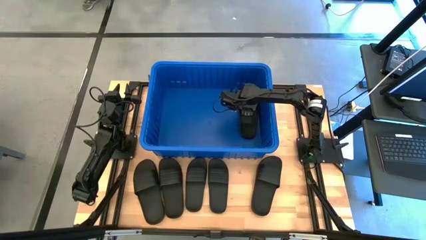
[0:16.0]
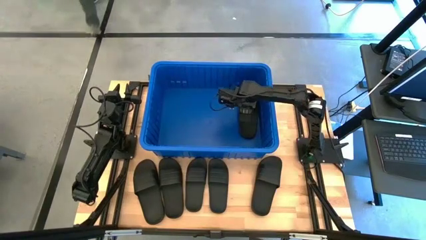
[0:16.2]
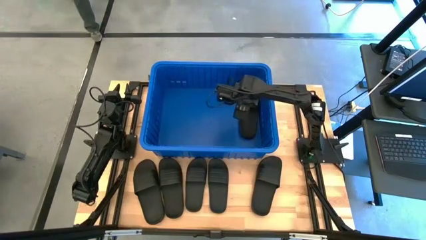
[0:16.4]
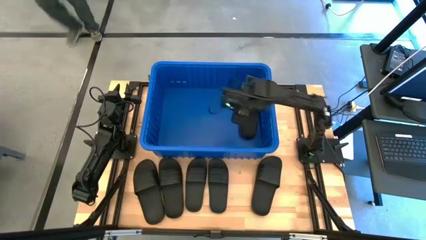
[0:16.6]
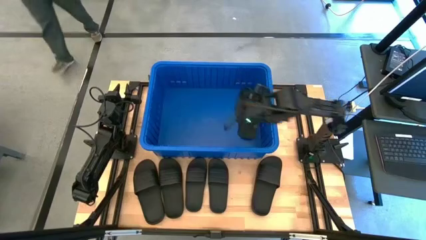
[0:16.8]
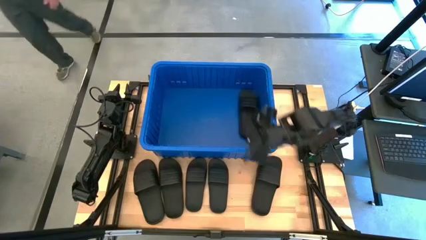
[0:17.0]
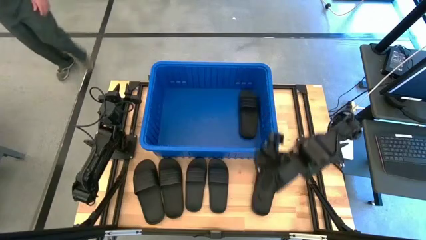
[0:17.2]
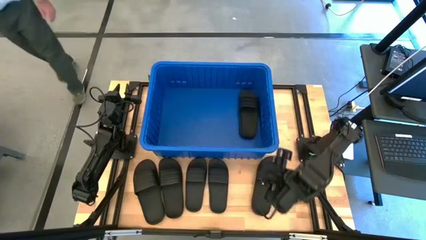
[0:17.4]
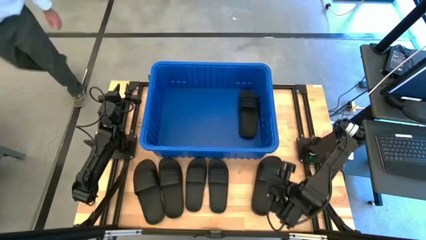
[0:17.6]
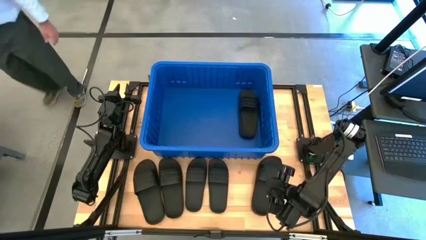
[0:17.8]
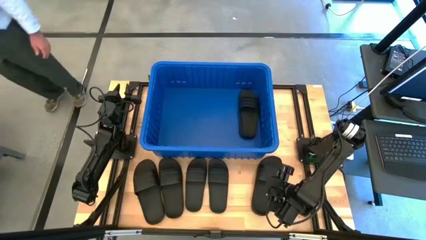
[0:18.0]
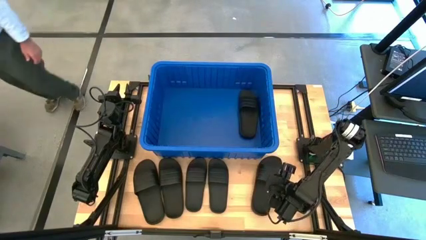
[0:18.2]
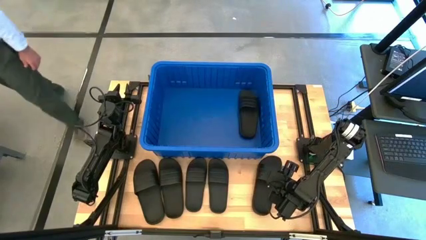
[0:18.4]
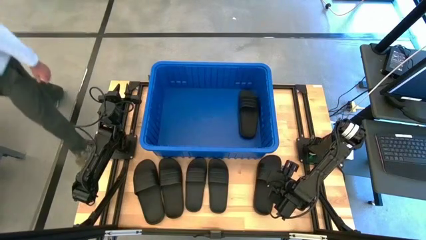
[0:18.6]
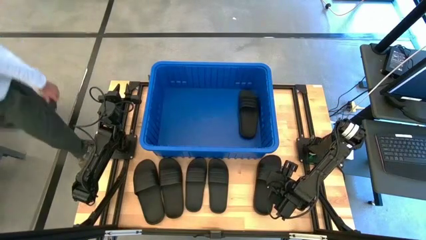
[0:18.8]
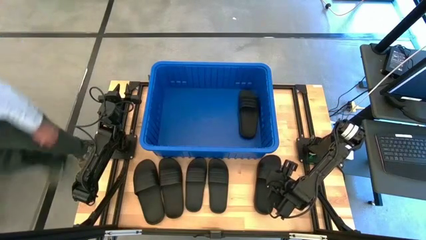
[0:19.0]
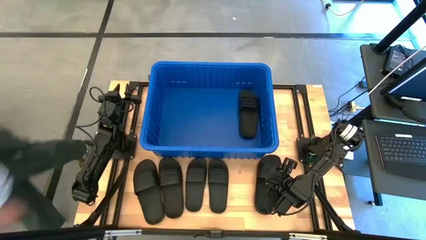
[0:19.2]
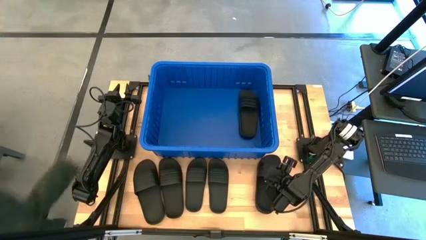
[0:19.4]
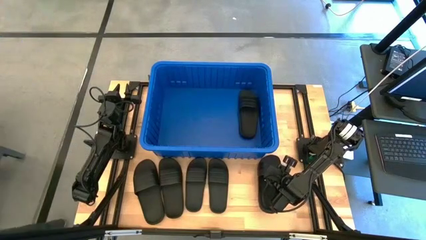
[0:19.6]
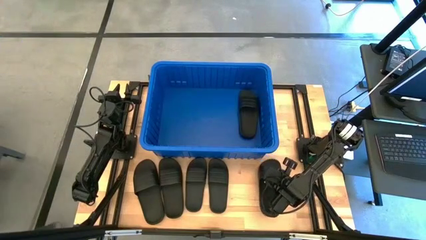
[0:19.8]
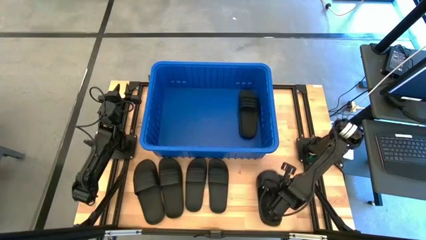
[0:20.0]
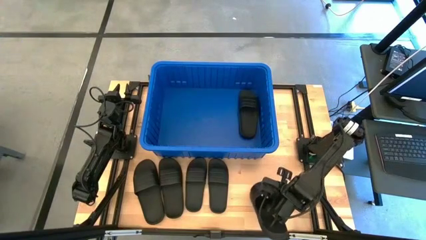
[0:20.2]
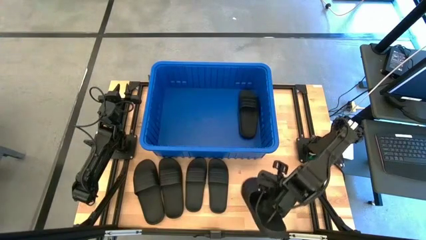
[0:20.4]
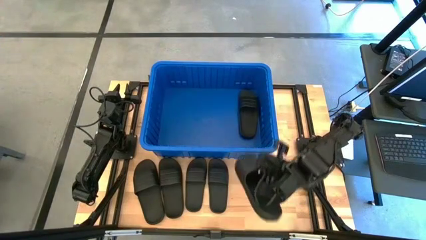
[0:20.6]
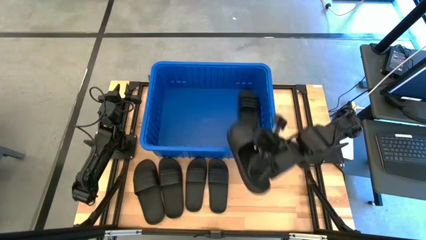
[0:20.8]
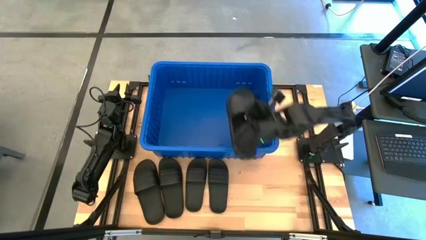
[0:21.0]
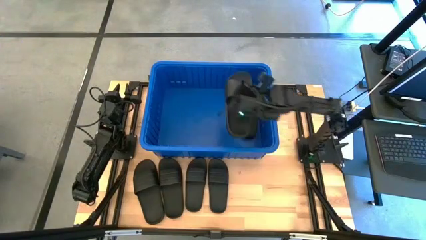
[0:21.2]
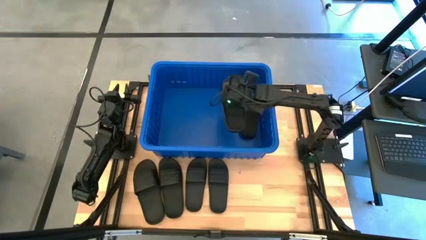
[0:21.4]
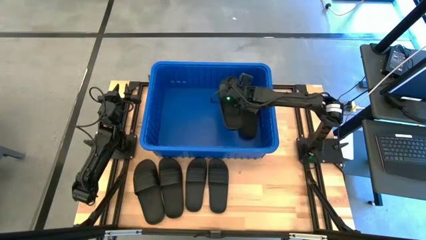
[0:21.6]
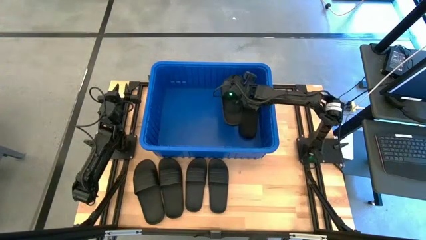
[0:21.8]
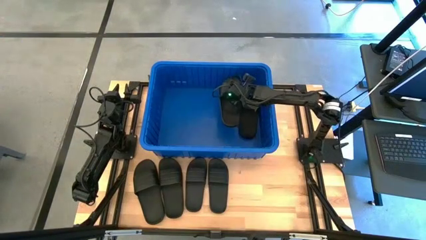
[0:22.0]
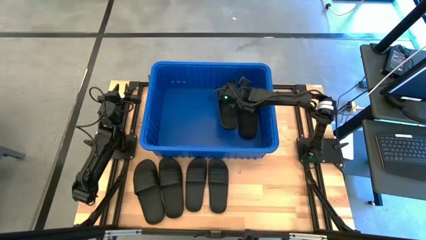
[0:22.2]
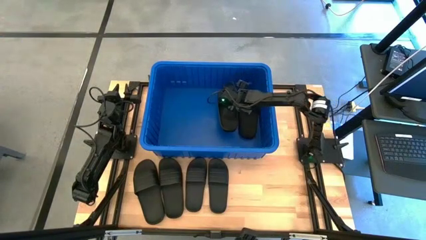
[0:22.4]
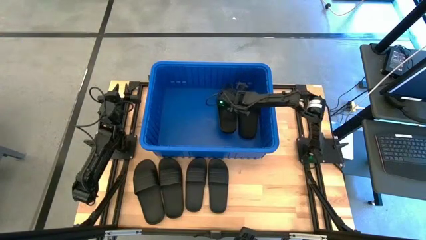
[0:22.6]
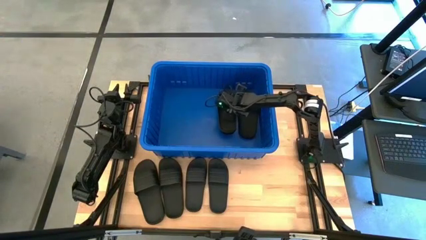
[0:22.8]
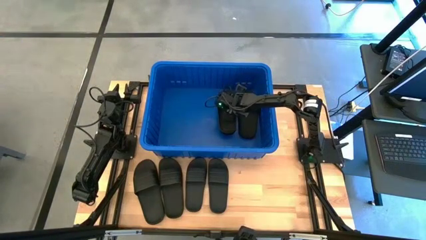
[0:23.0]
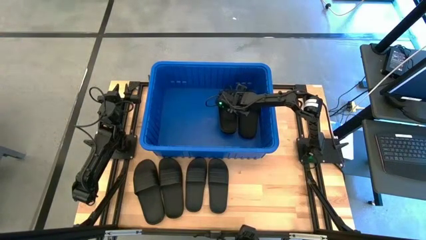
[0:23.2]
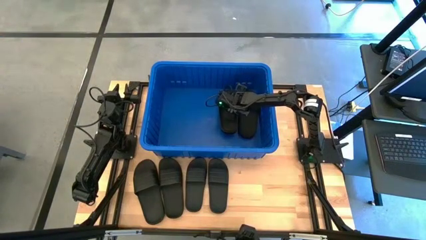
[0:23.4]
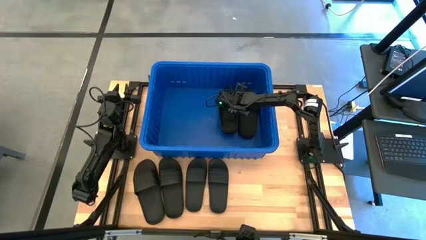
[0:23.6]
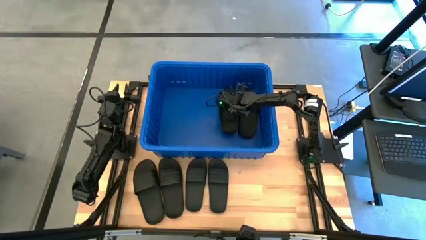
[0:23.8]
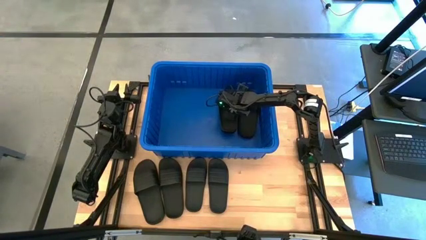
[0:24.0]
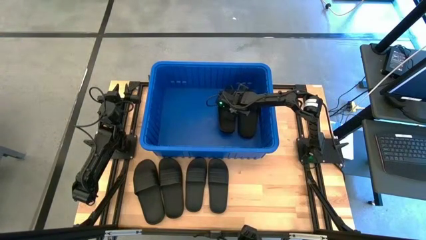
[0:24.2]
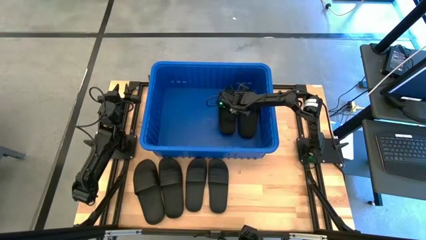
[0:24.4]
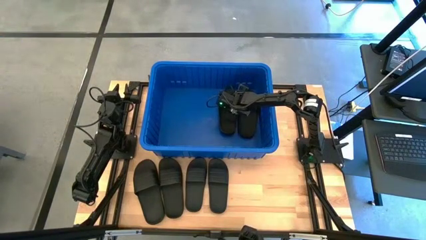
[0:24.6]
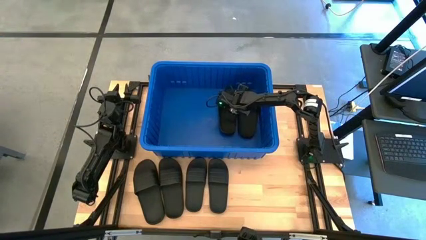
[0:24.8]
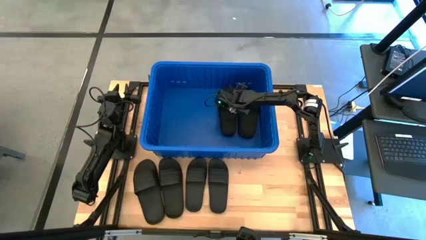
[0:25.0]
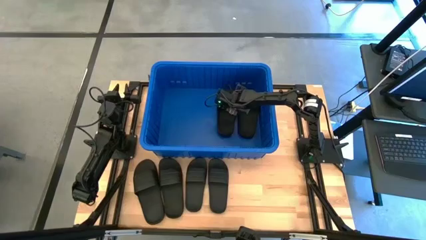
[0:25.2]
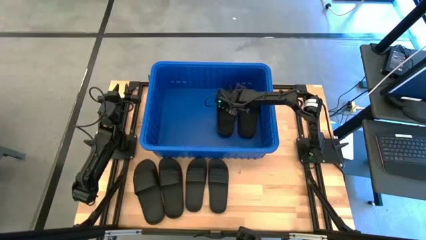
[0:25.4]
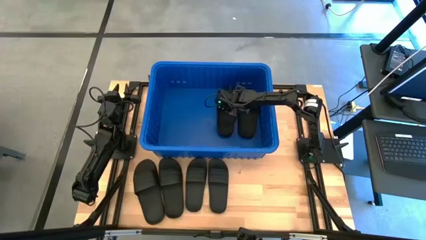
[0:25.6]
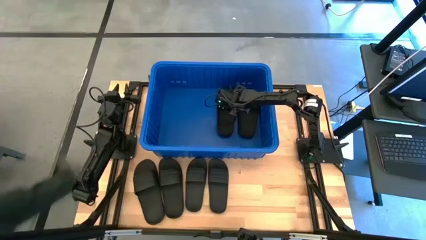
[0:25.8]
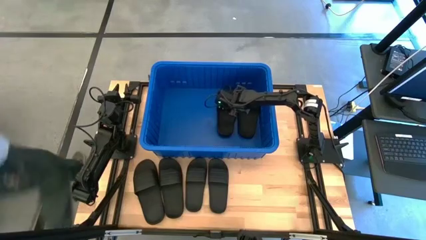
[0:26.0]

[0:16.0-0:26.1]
Task: Pick and place slides into bin
Put the black slides into the blue organizer bin
